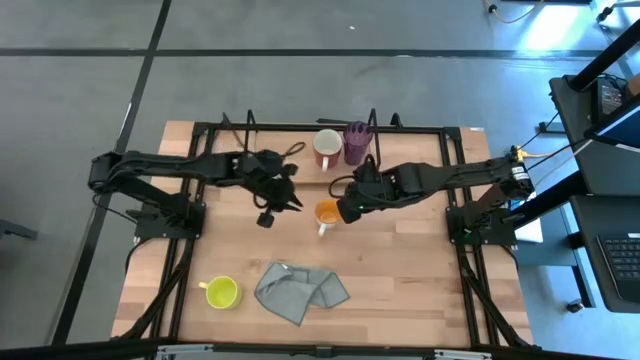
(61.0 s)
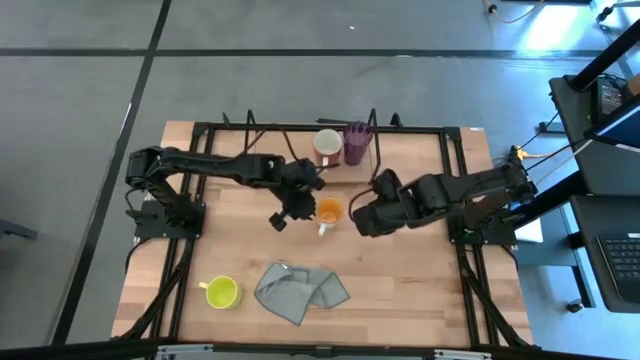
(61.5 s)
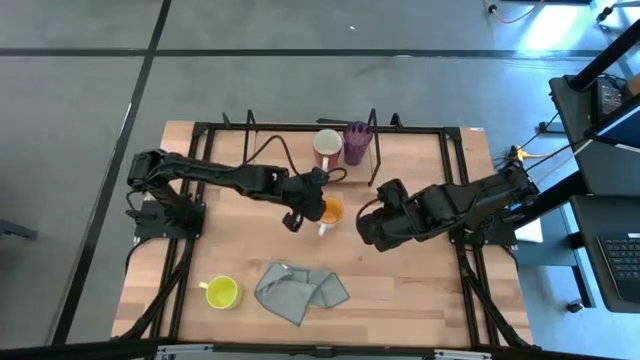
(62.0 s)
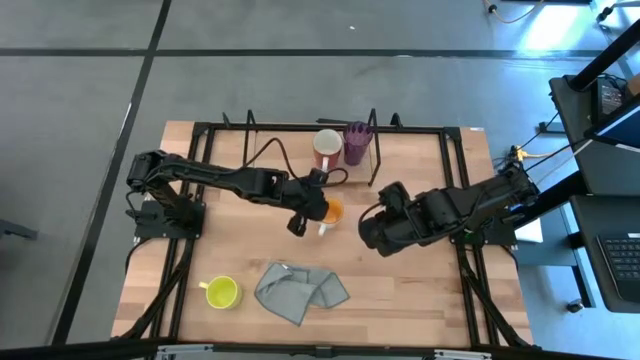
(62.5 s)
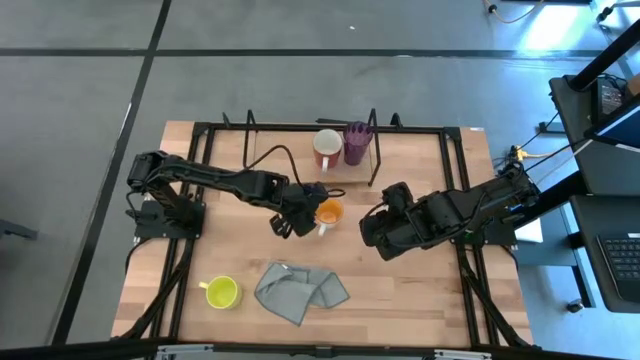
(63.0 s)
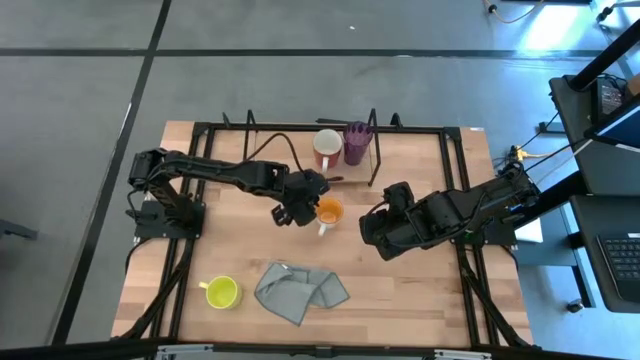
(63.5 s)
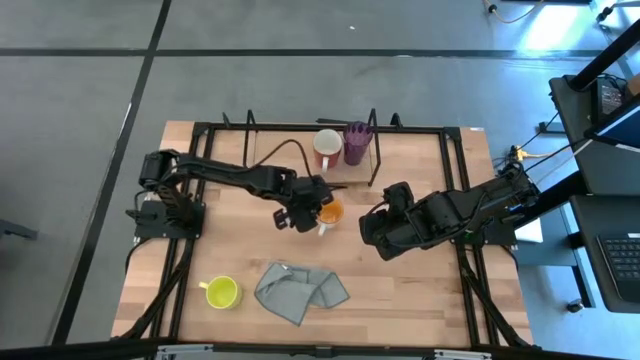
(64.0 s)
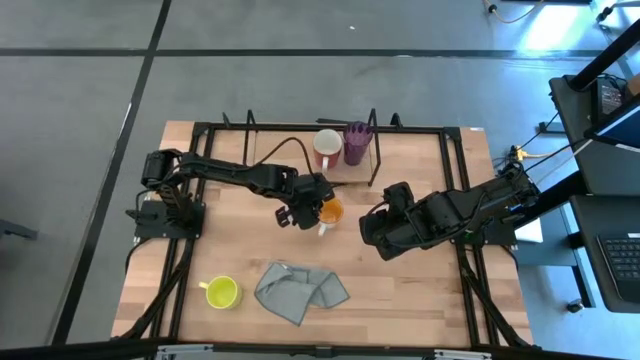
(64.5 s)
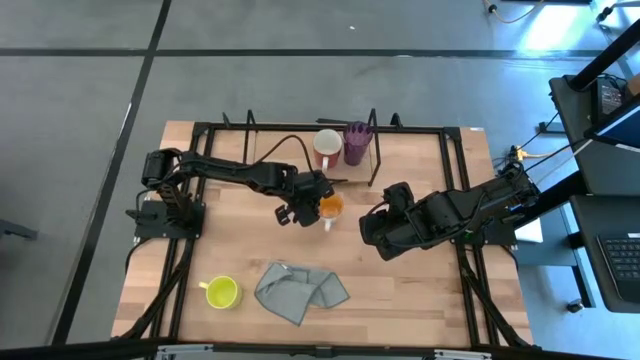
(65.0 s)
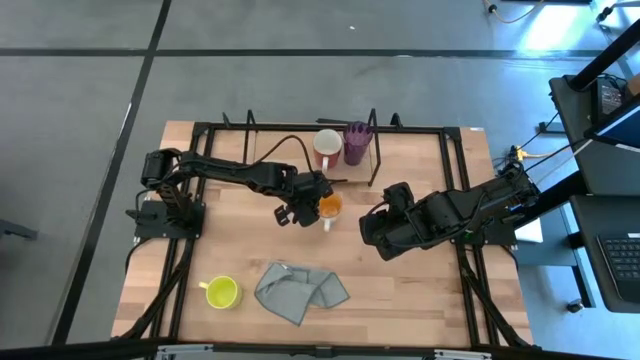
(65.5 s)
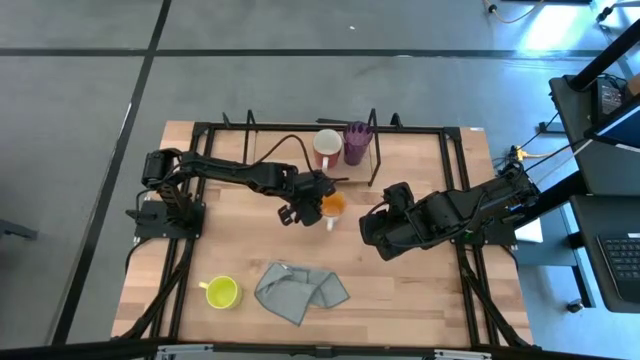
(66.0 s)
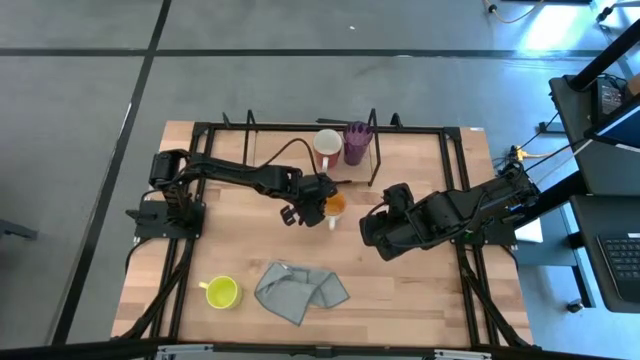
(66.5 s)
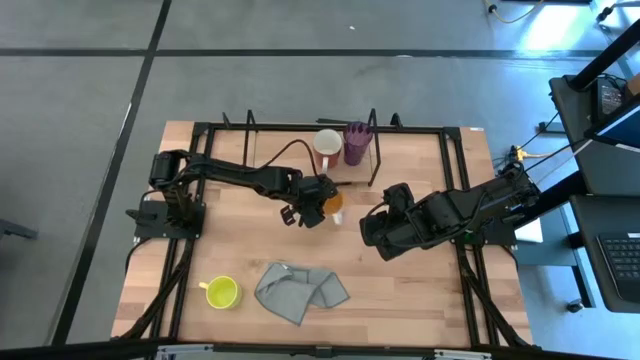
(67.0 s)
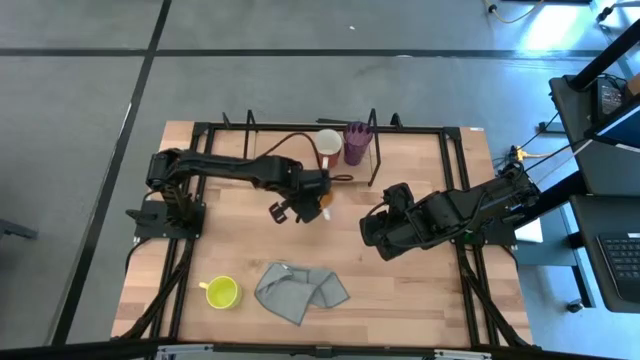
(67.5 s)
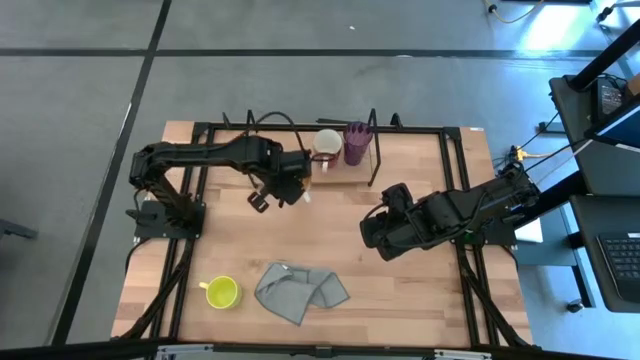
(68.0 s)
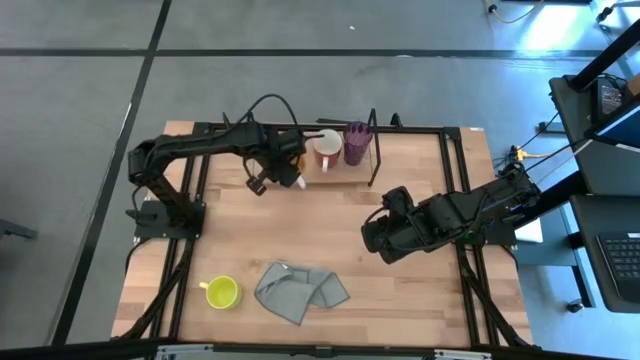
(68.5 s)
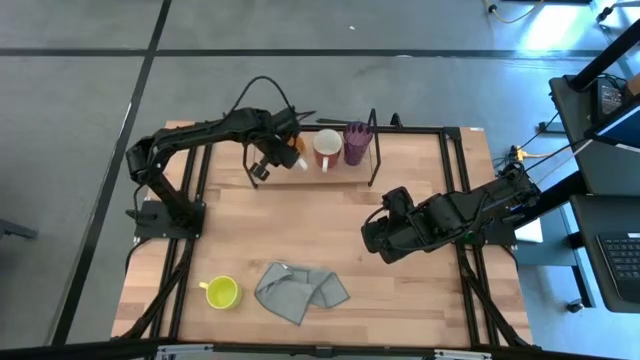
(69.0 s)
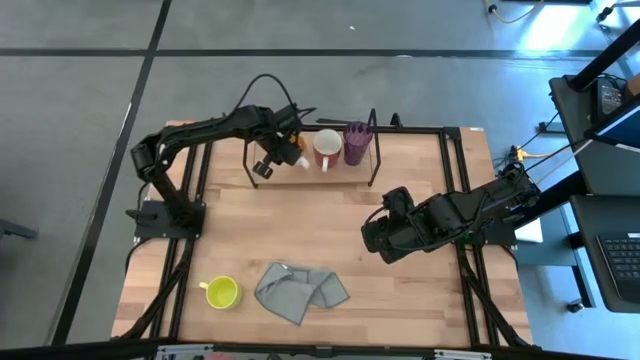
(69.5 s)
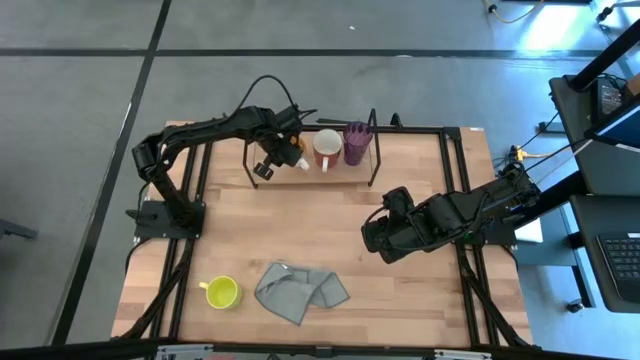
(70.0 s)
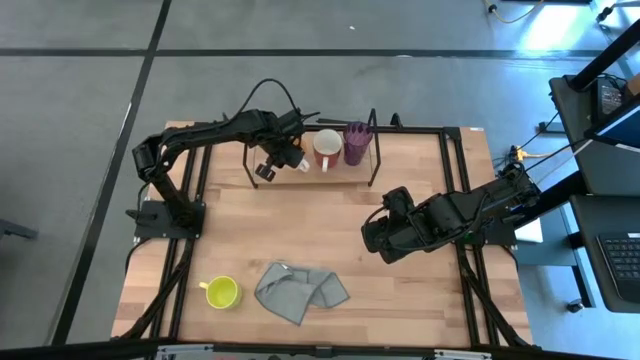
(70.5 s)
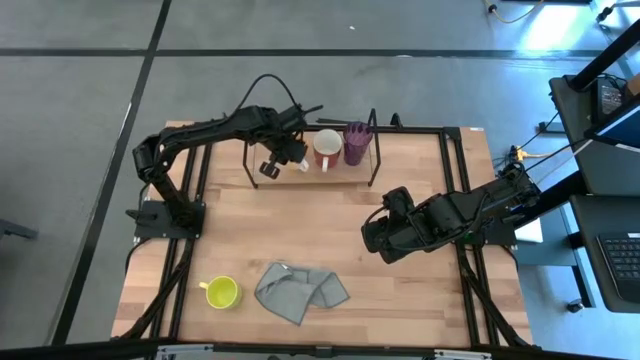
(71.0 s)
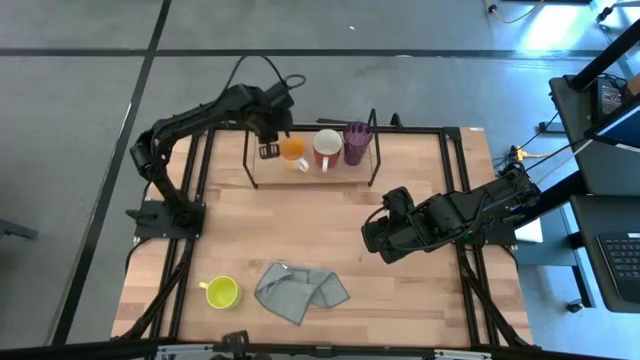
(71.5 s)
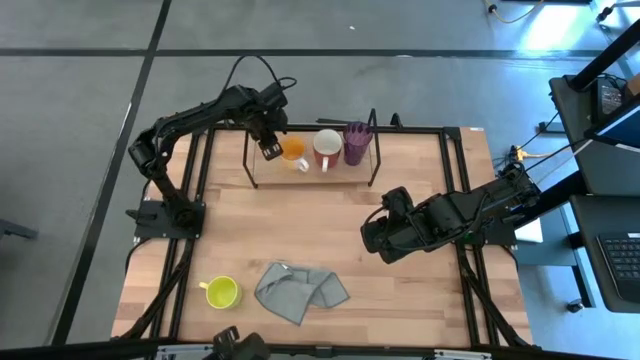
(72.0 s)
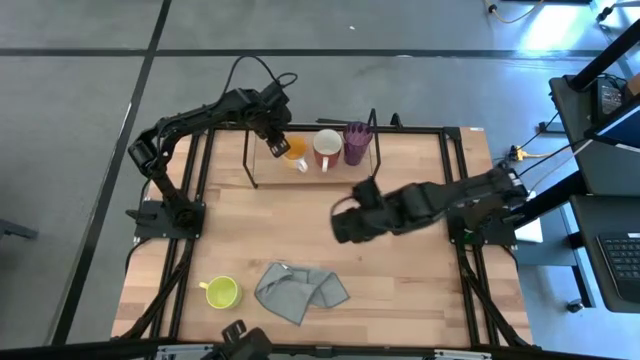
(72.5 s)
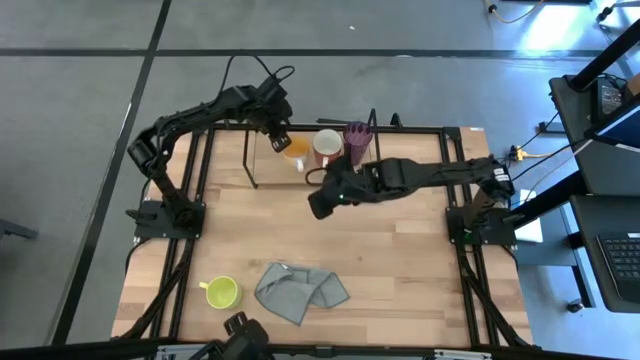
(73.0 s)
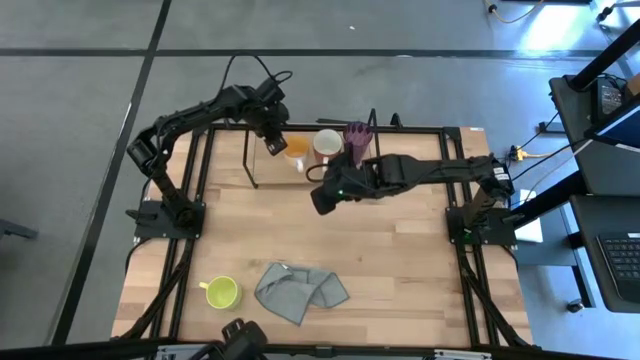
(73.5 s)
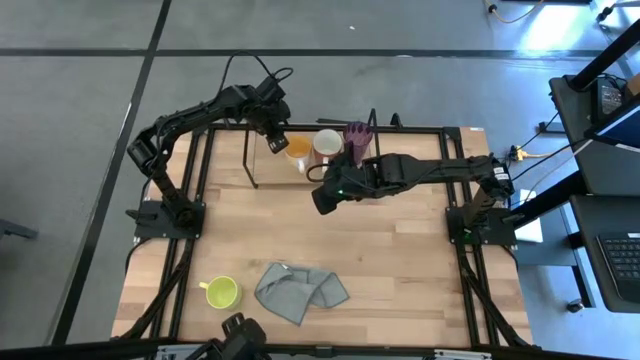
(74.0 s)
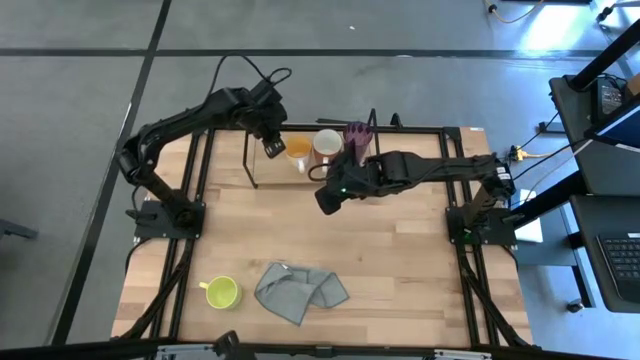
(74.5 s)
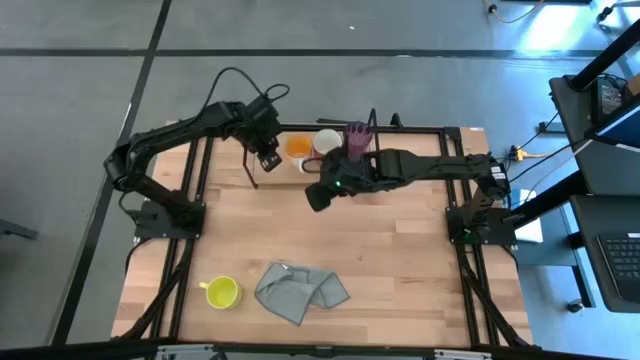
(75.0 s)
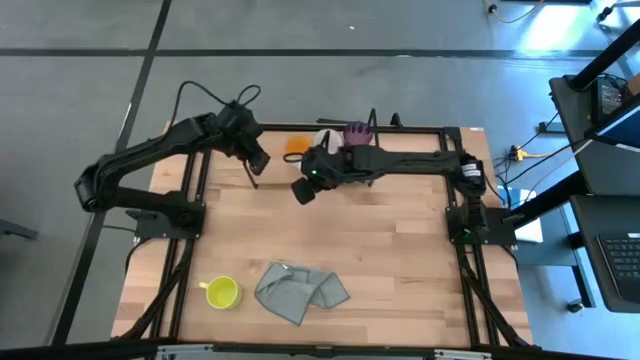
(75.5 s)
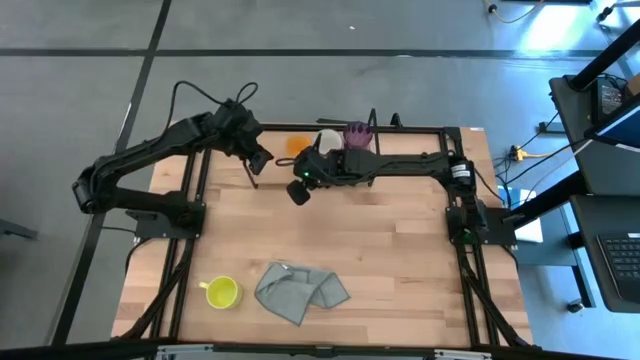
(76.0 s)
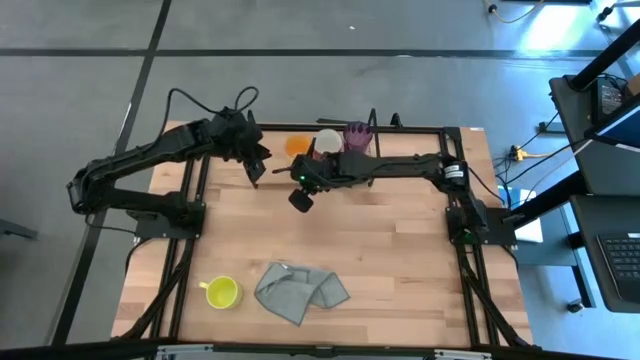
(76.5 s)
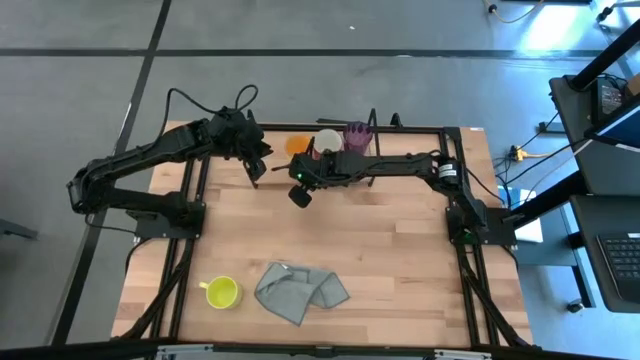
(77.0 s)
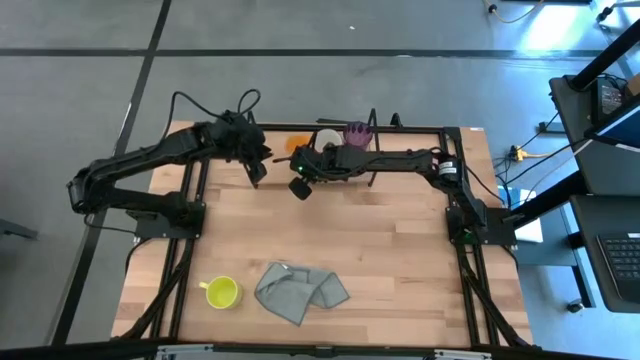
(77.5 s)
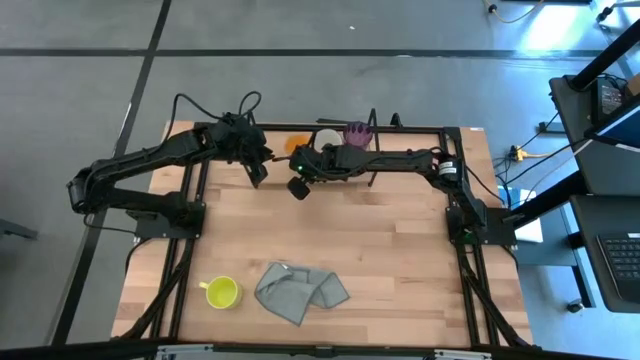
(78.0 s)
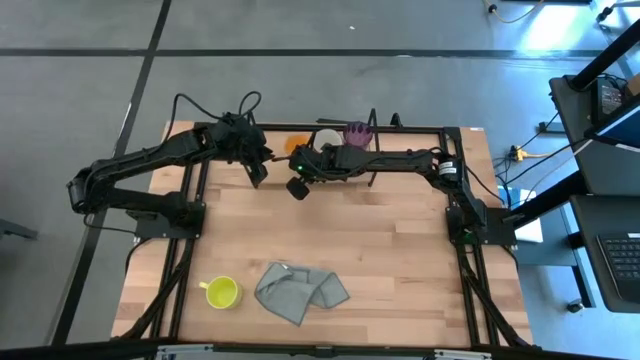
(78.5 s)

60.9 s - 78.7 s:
Task: Stack small to large cups/mugs on shelf
Put the yellow mug on the shelf

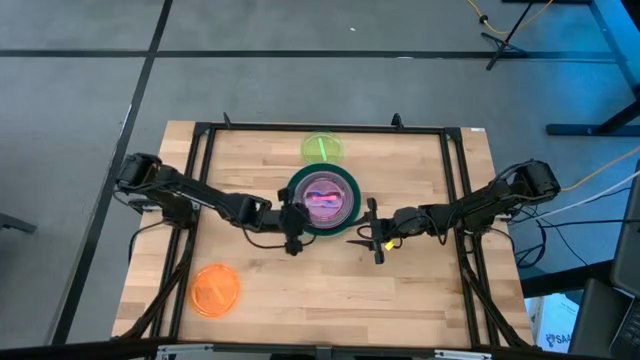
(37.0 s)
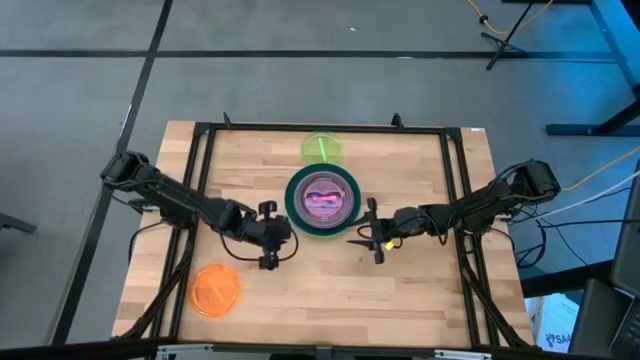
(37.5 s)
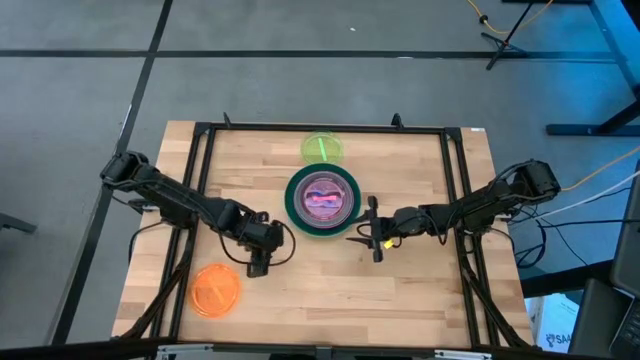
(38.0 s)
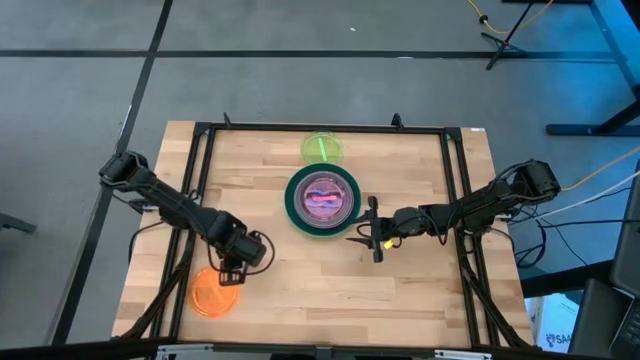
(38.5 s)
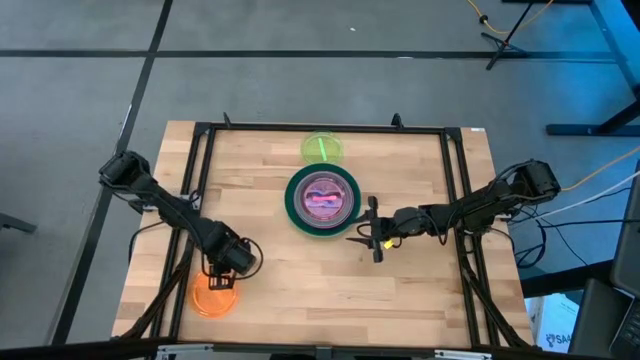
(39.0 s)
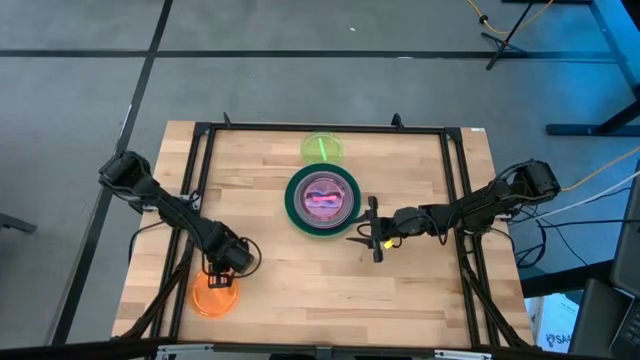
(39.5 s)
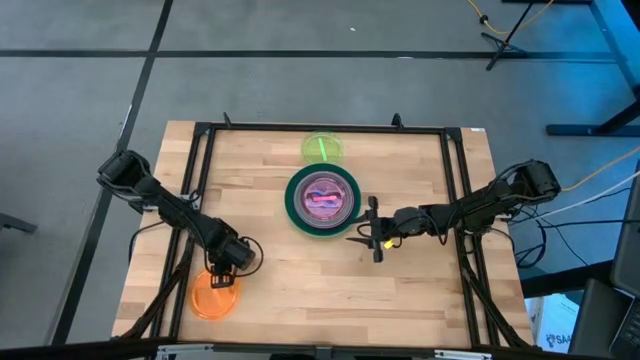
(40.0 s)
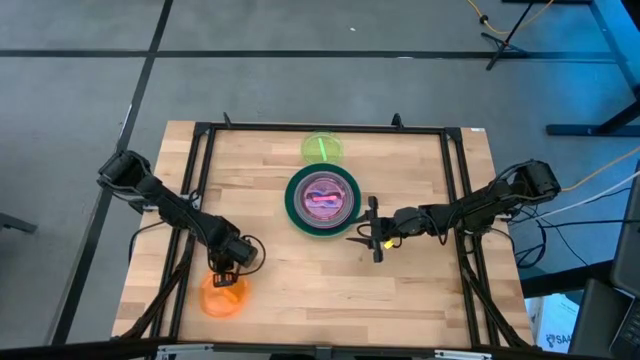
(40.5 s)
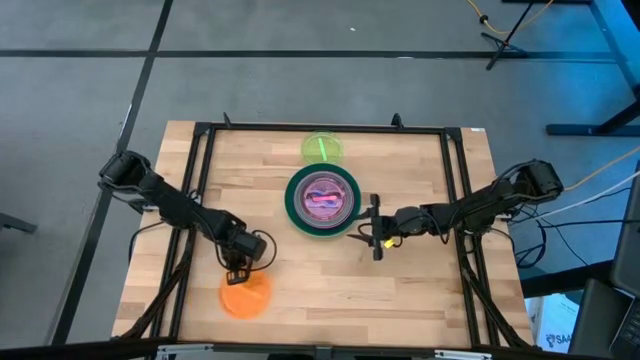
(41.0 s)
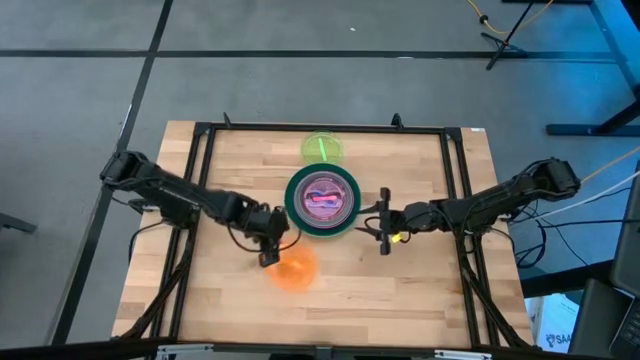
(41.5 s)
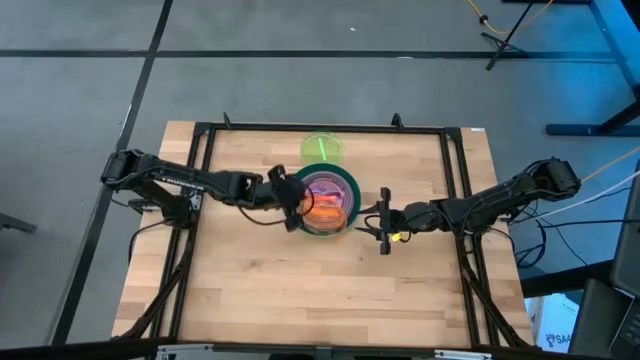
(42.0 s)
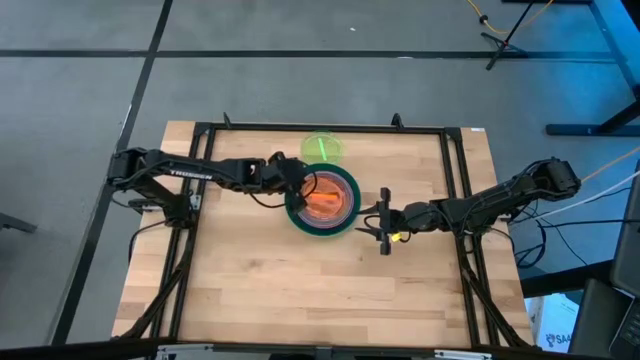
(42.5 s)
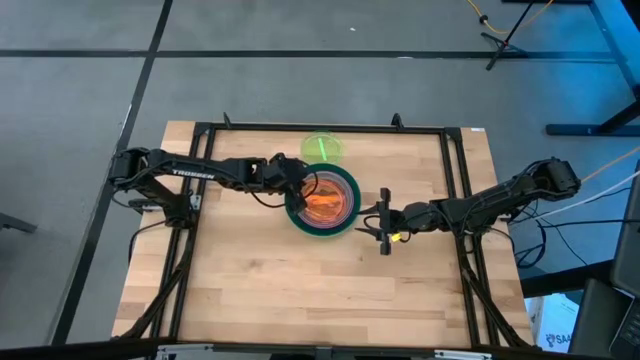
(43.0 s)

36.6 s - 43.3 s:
Task: Stack plastic plates
Stack the orange plate on top of the pink plate
